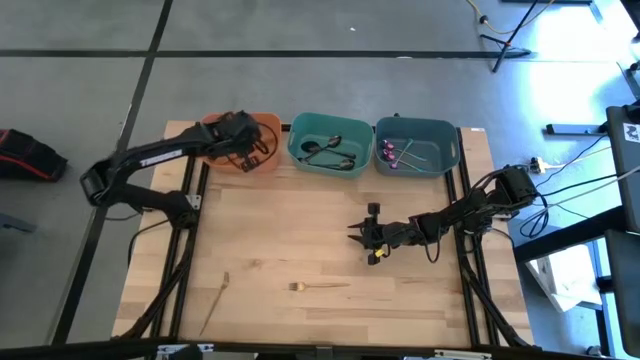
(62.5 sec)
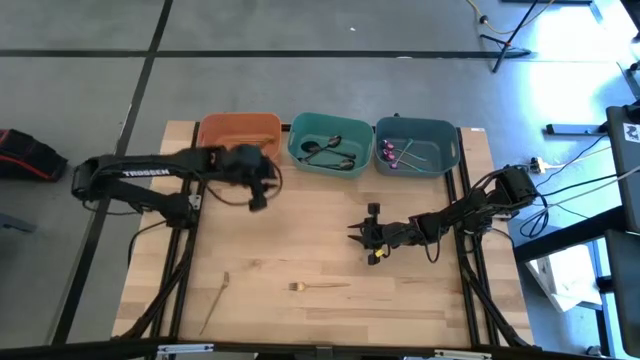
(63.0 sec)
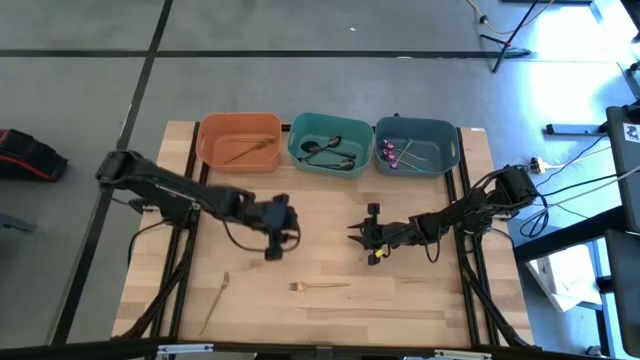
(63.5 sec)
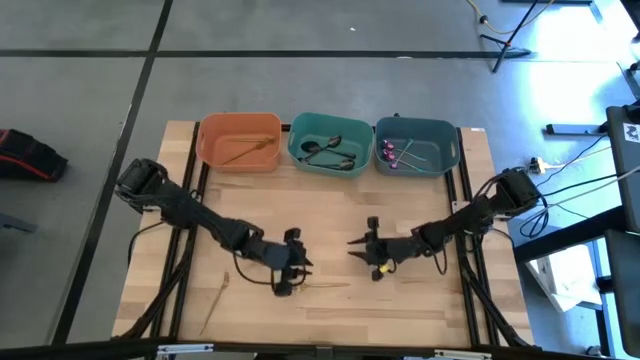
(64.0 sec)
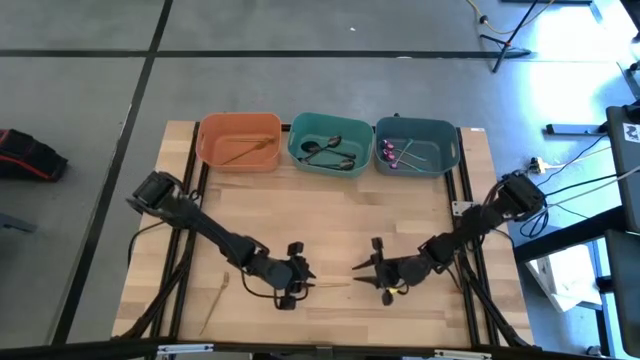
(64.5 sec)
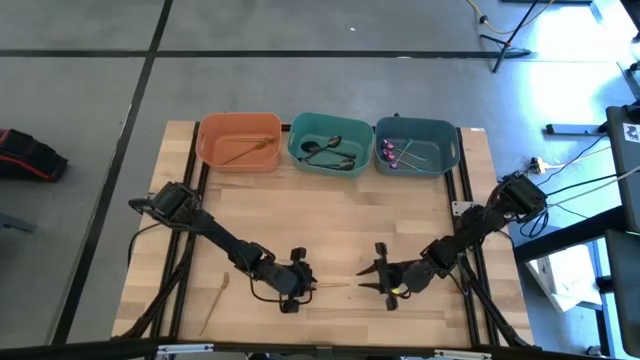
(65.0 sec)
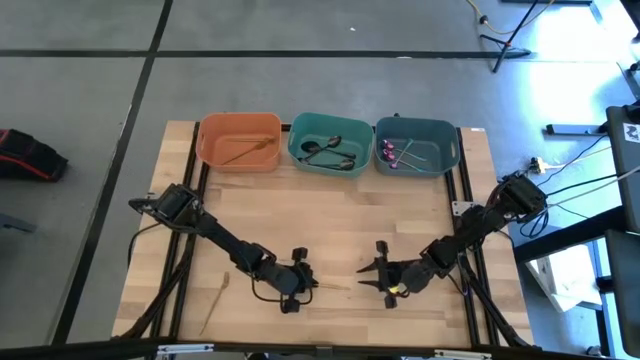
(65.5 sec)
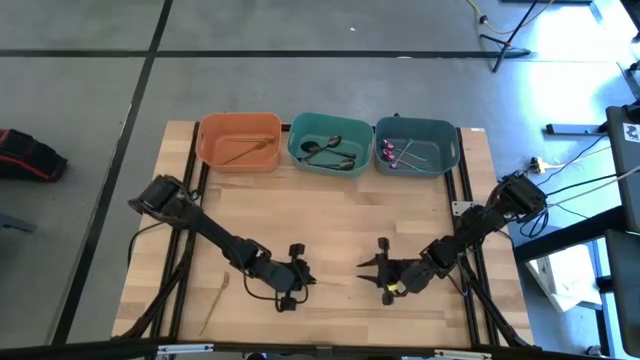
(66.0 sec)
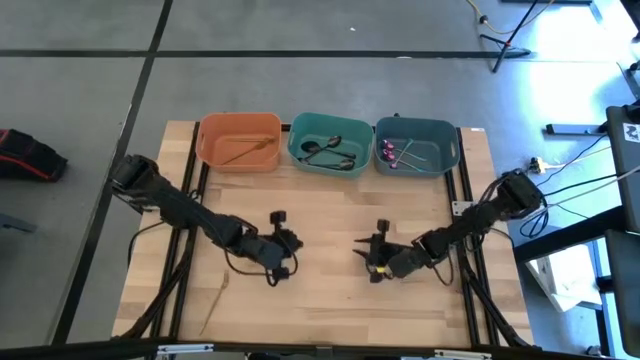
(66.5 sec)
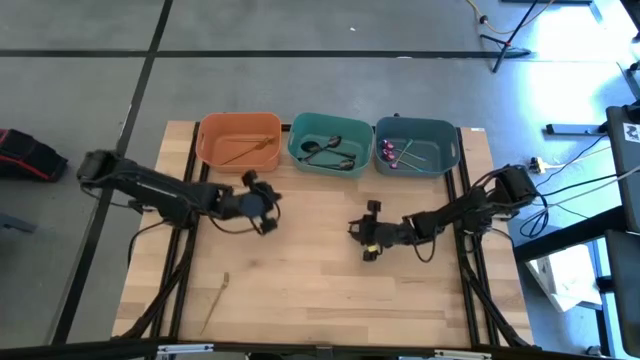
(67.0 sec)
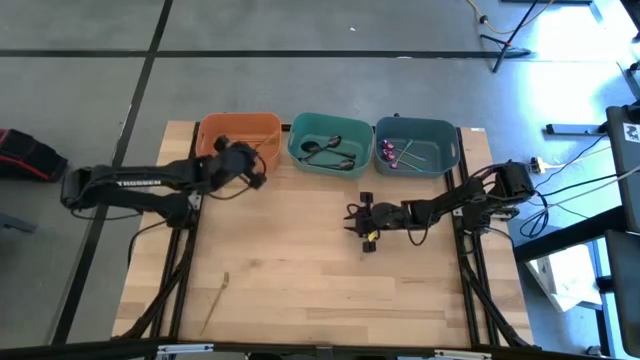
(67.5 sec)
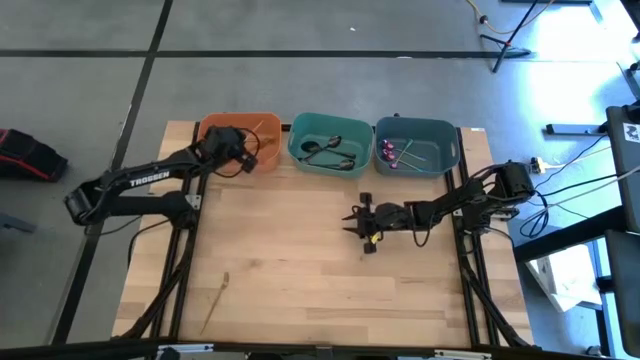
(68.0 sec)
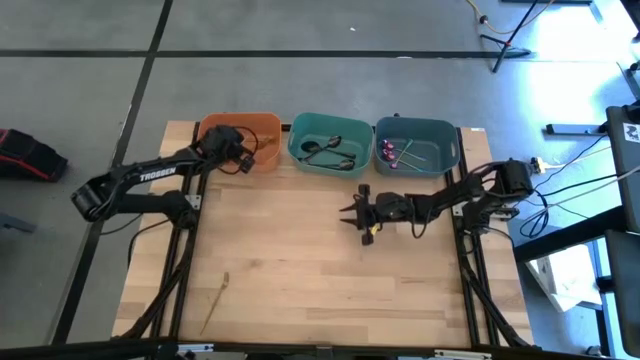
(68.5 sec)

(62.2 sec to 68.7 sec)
Task: Sort silverware by color (type)
Put the gold fork into the orange bin

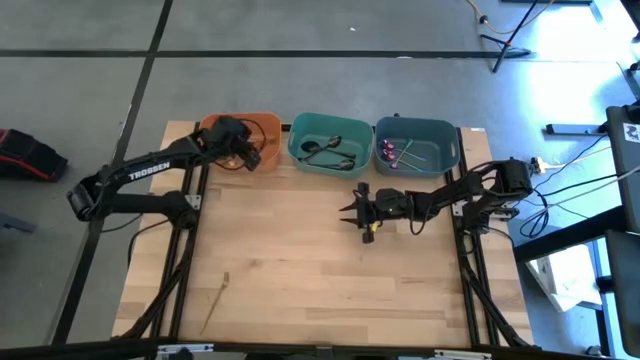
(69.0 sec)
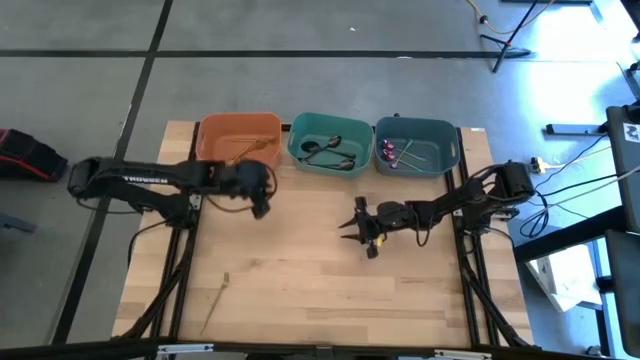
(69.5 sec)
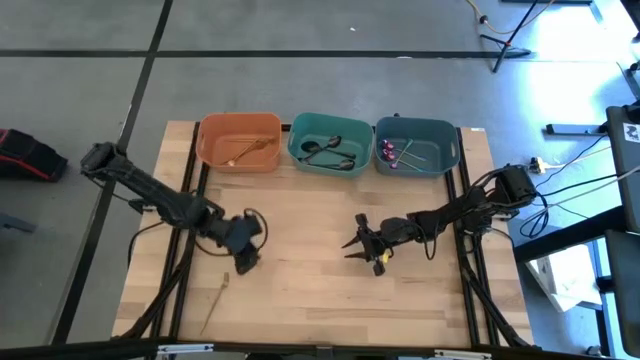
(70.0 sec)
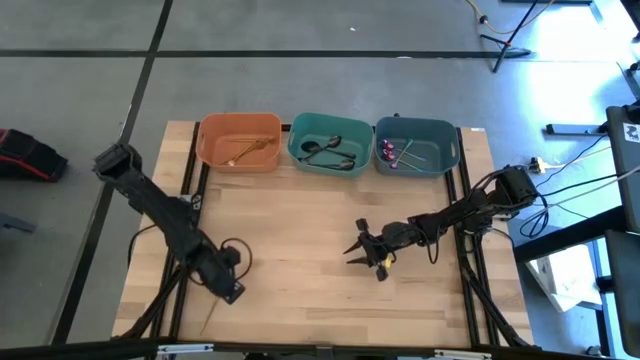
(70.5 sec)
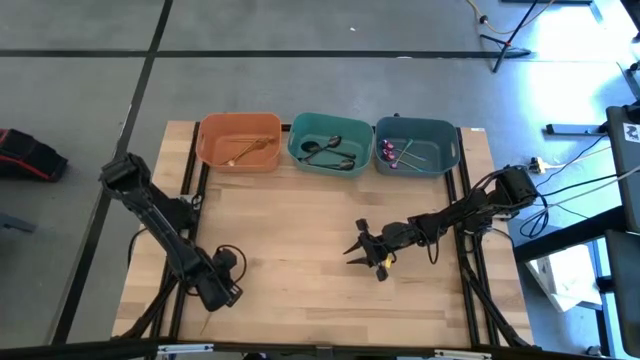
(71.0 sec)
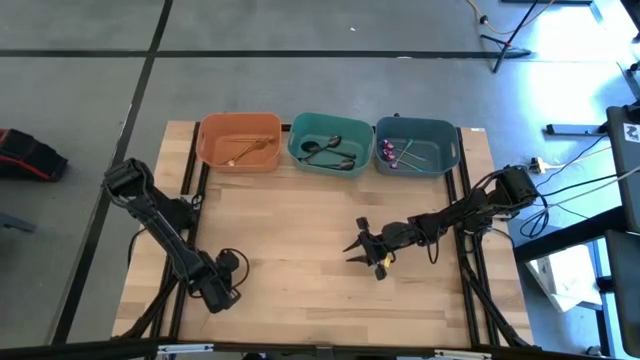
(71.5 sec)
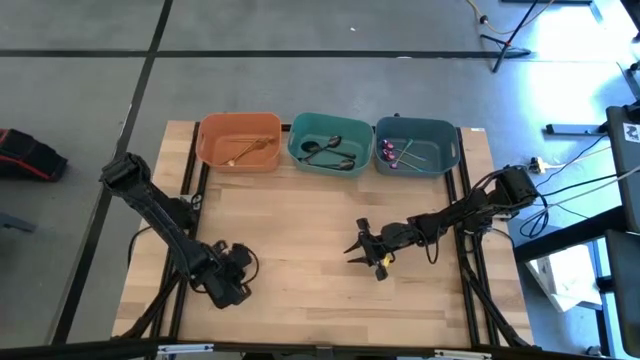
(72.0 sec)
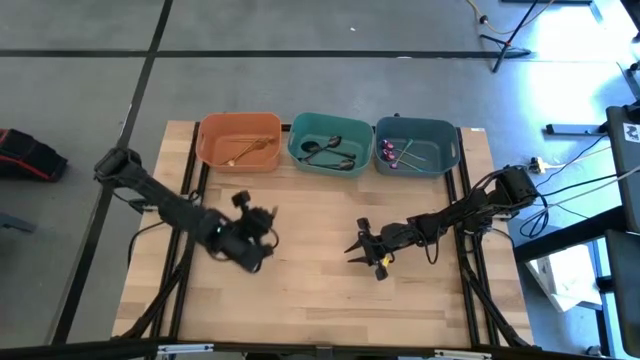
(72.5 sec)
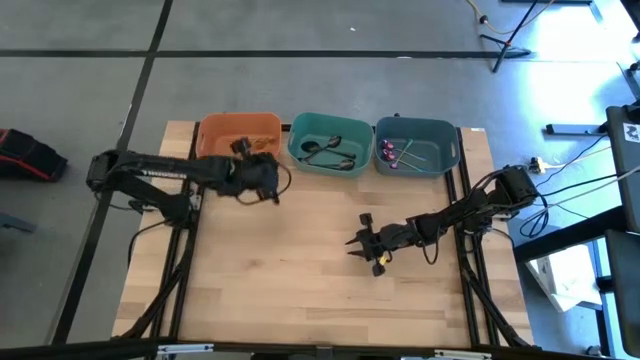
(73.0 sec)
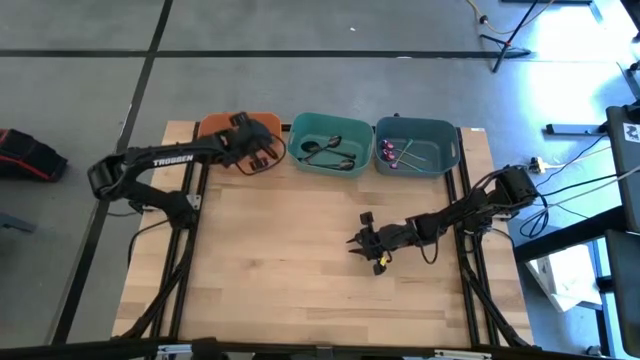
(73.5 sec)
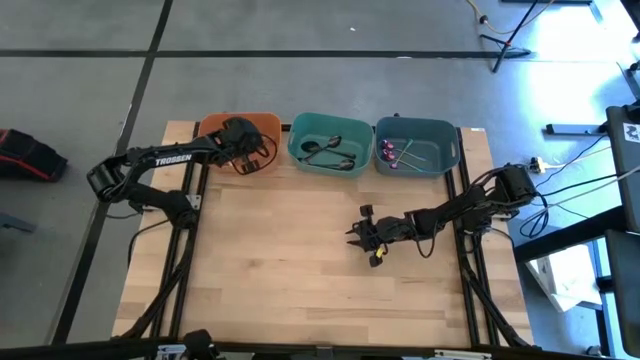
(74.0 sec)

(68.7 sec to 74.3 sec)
Put the gold fork into the orange bin

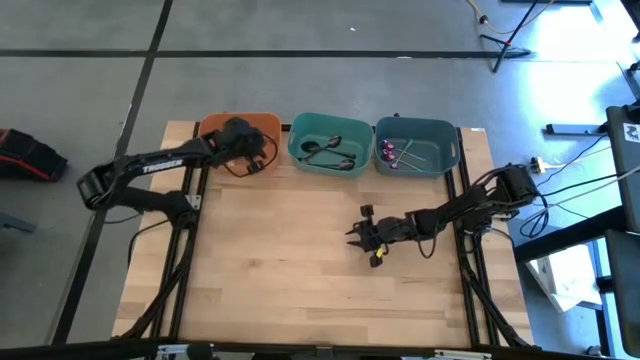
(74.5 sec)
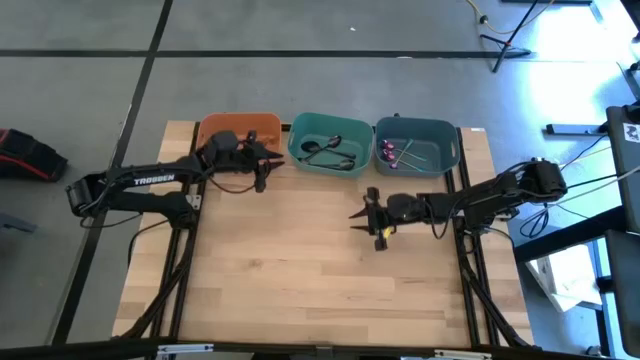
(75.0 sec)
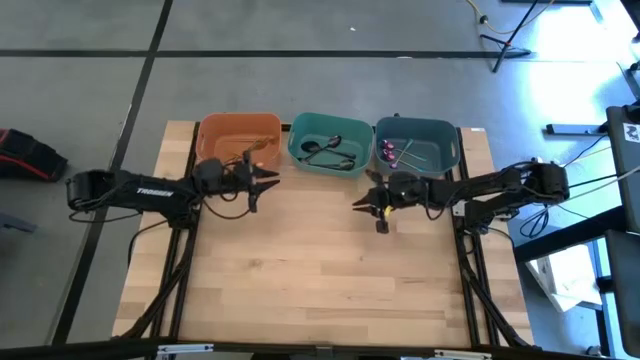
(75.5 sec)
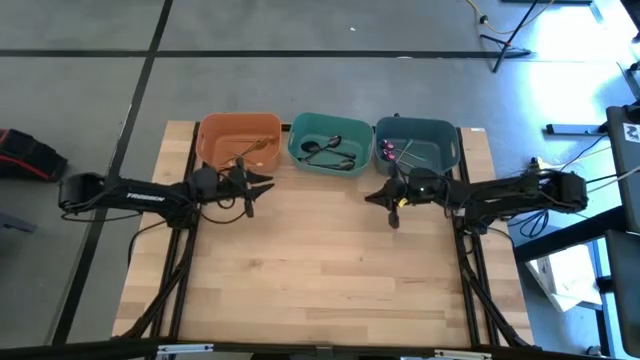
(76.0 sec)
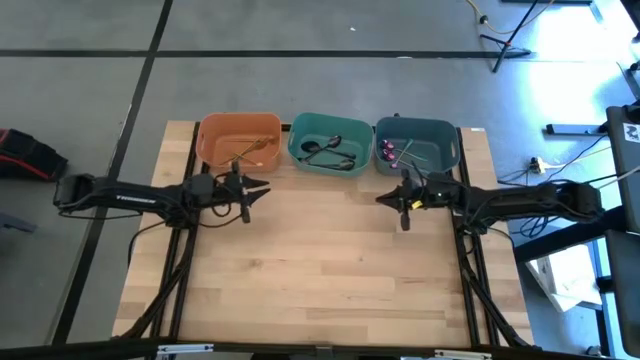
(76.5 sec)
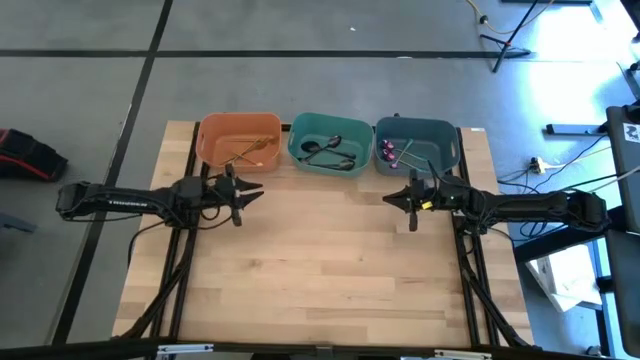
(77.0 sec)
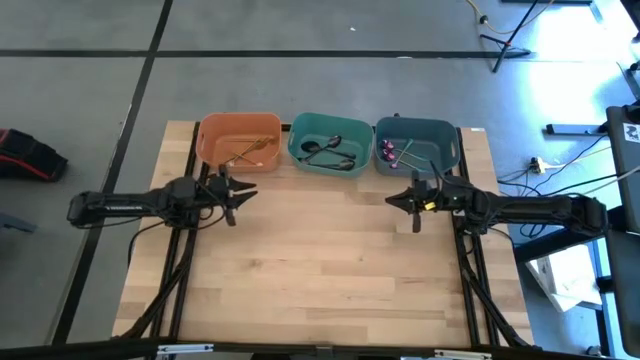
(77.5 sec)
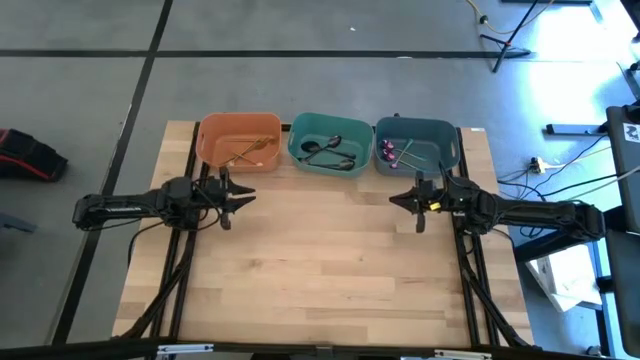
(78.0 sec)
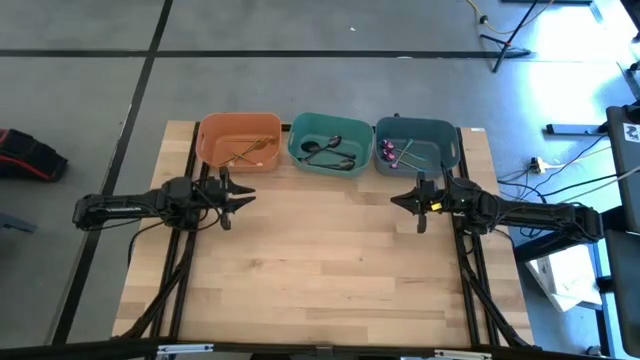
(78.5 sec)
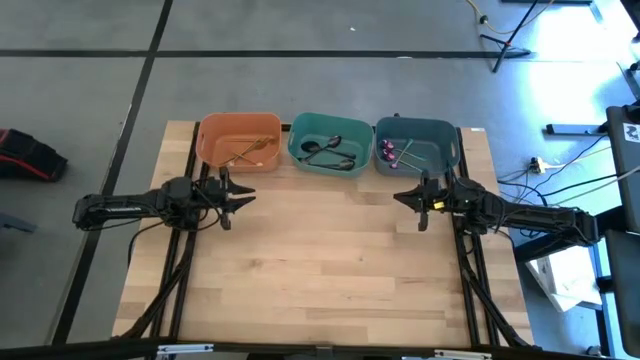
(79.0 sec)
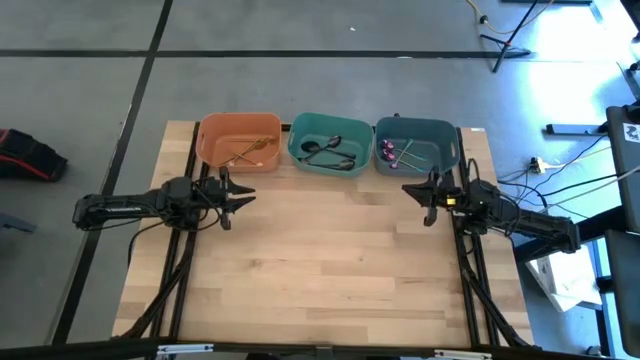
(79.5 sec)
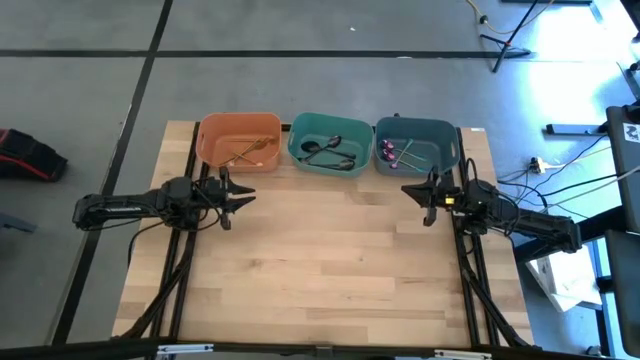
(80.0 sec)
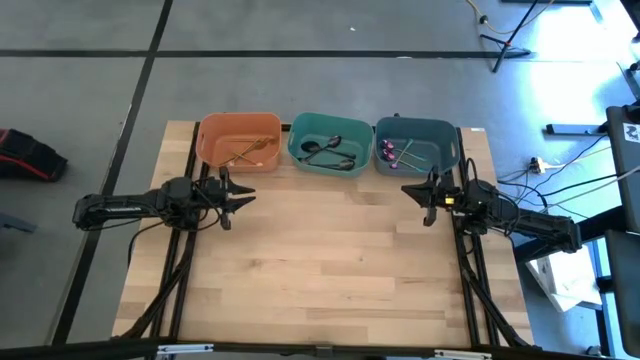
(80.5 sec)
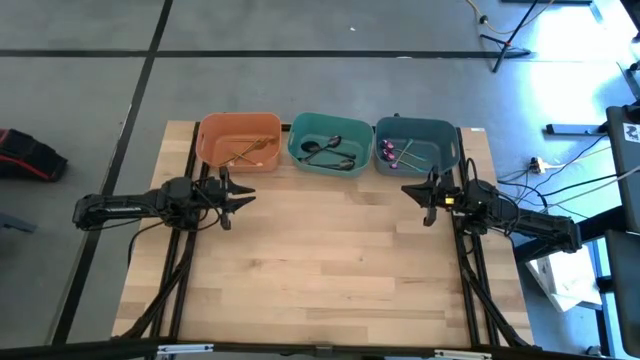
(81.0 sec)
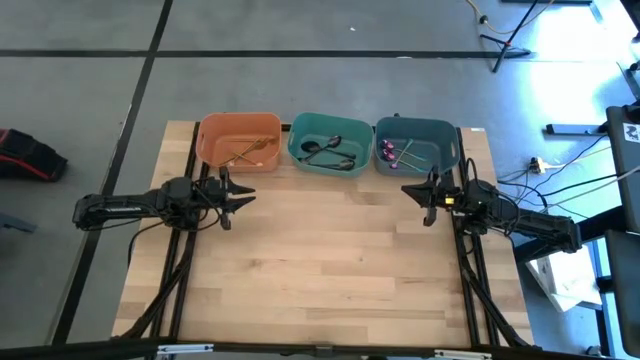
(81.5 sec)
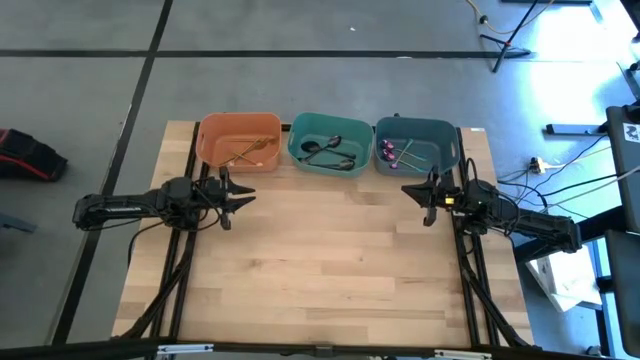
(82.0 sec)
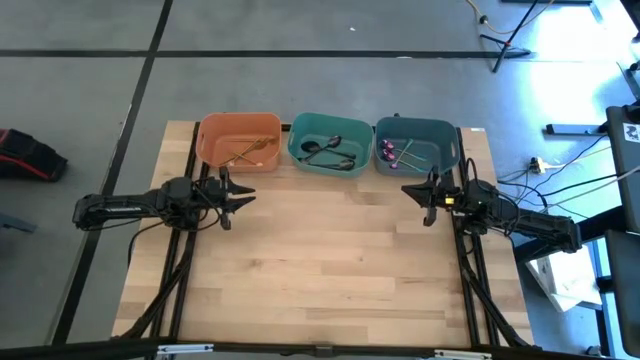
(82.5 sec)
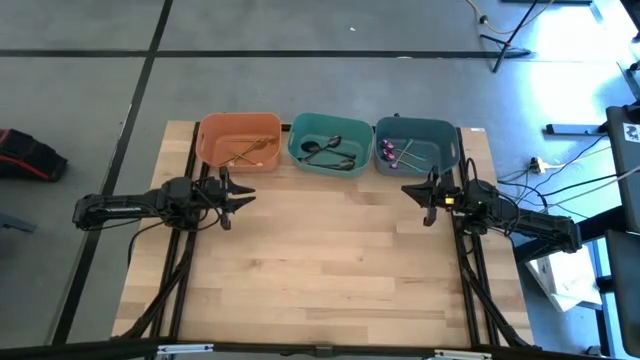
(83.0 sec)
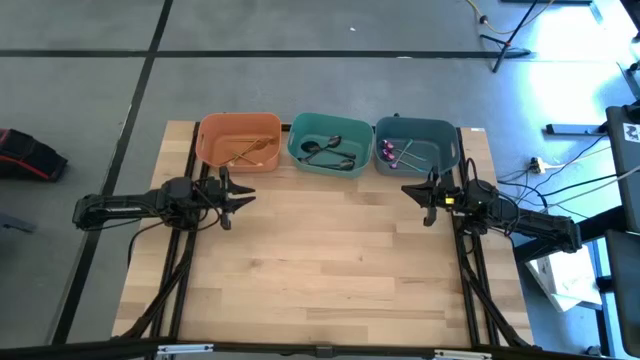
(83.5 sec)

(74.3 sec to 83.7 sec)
Return to Home Position
